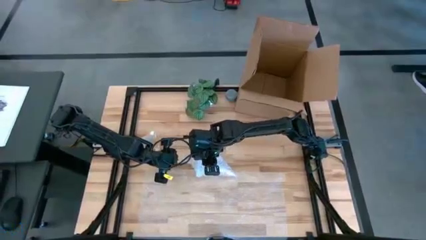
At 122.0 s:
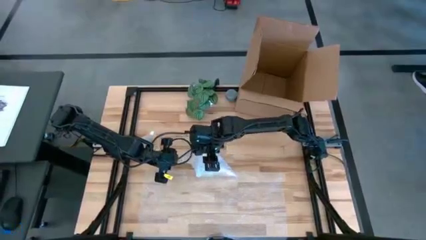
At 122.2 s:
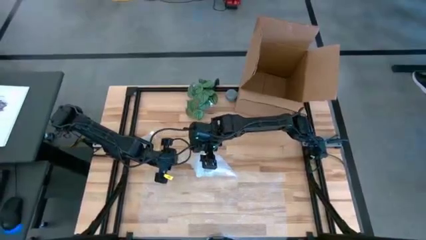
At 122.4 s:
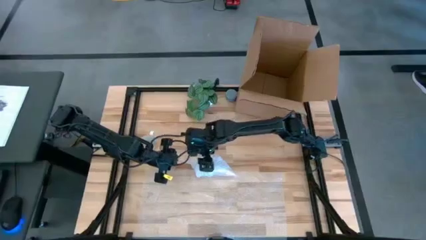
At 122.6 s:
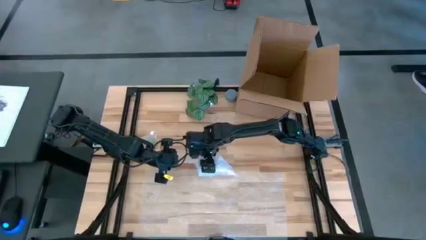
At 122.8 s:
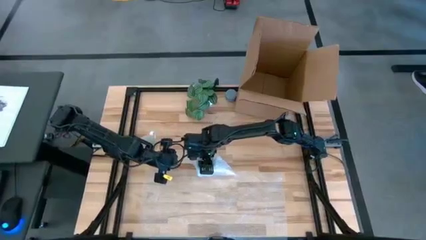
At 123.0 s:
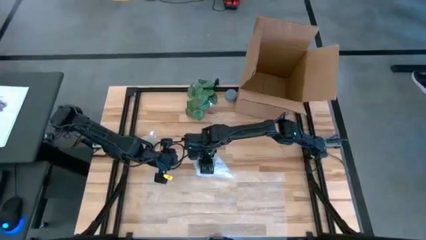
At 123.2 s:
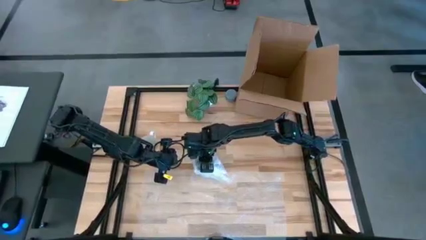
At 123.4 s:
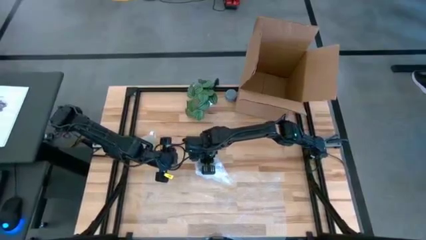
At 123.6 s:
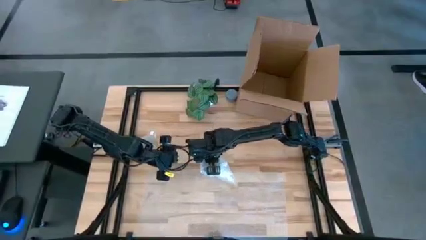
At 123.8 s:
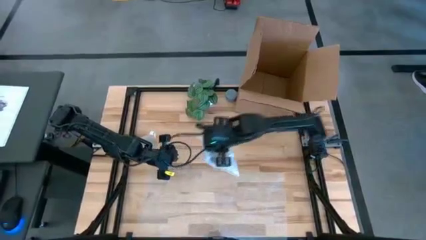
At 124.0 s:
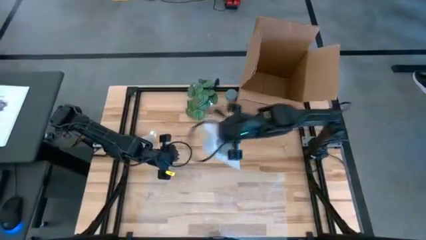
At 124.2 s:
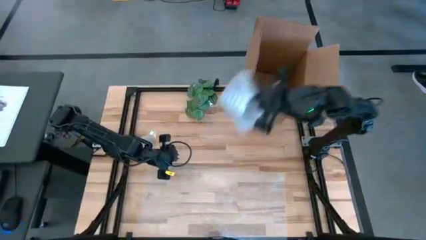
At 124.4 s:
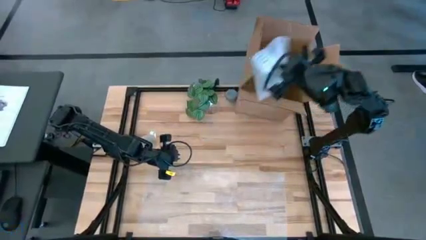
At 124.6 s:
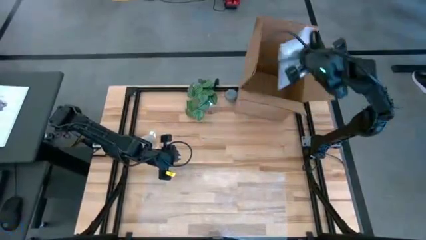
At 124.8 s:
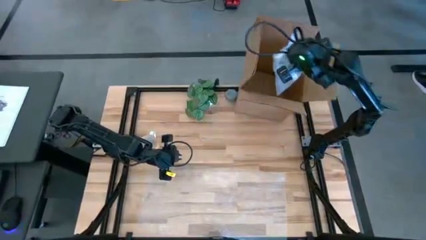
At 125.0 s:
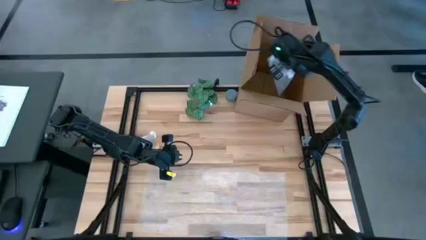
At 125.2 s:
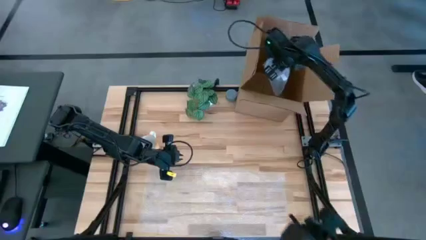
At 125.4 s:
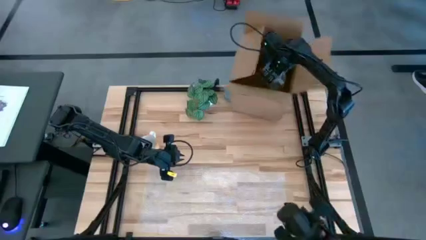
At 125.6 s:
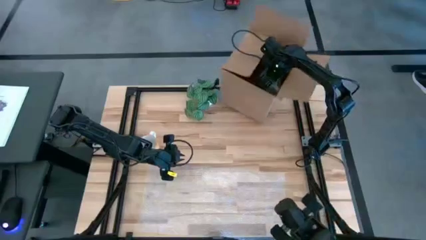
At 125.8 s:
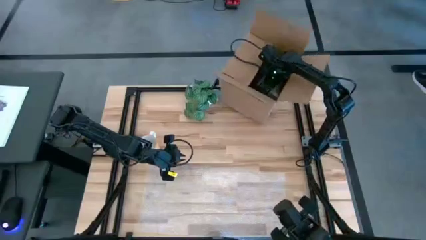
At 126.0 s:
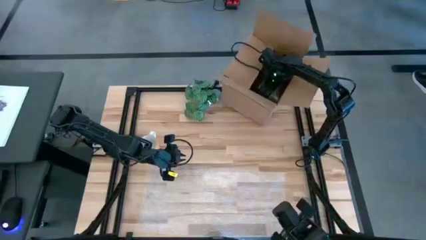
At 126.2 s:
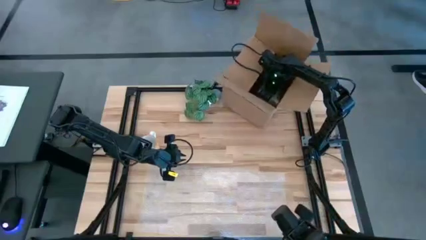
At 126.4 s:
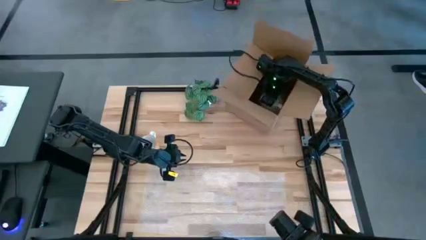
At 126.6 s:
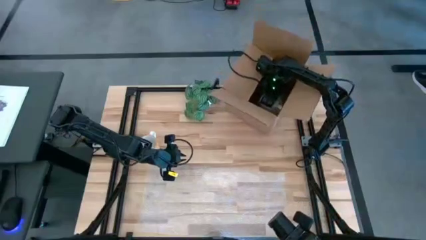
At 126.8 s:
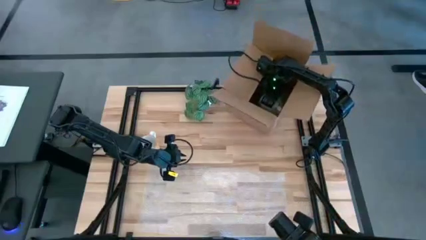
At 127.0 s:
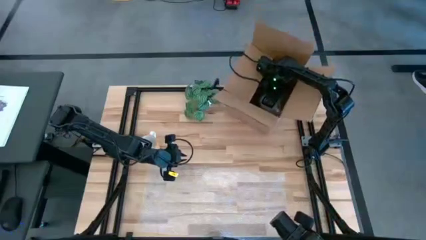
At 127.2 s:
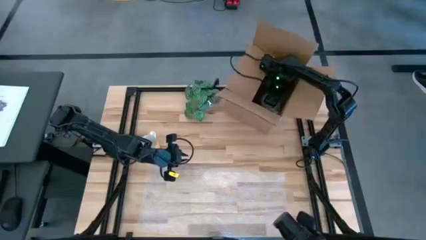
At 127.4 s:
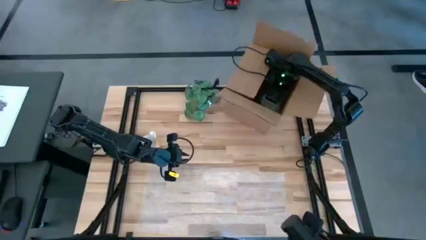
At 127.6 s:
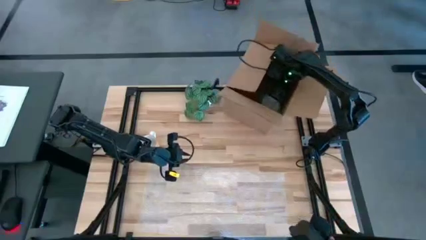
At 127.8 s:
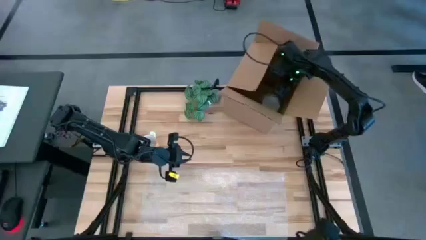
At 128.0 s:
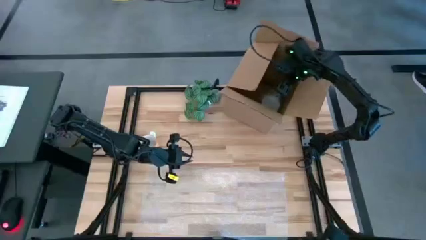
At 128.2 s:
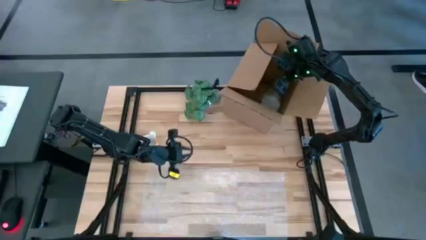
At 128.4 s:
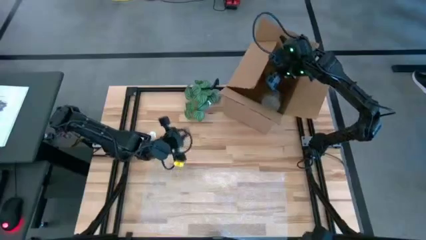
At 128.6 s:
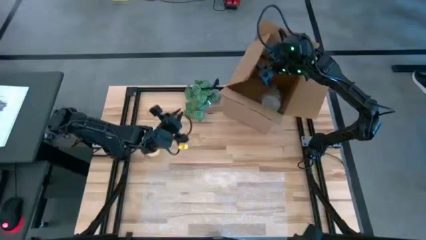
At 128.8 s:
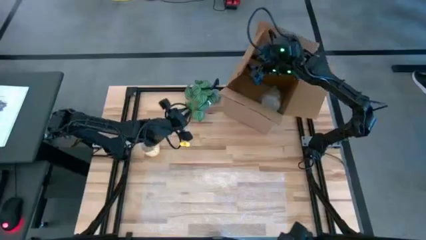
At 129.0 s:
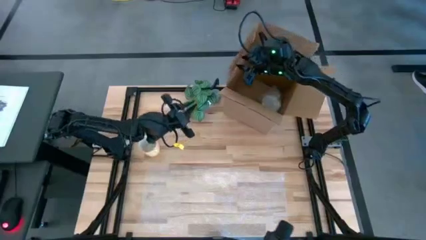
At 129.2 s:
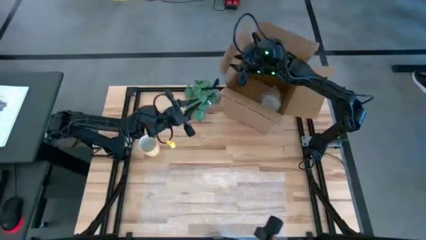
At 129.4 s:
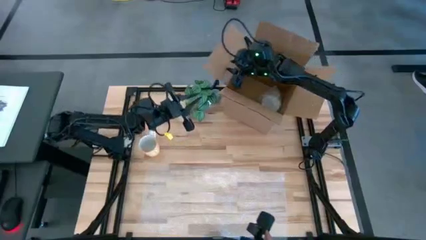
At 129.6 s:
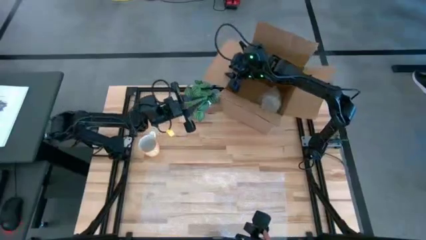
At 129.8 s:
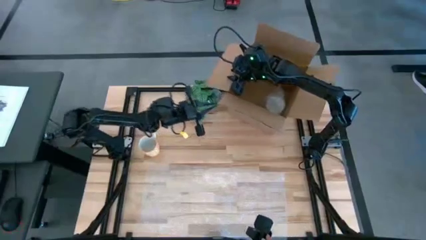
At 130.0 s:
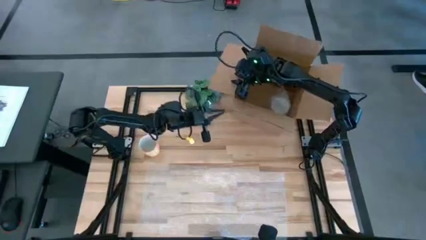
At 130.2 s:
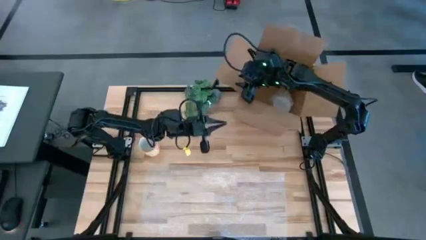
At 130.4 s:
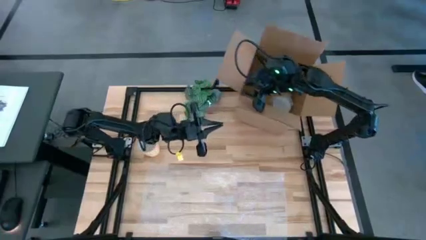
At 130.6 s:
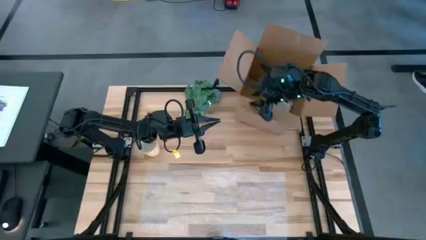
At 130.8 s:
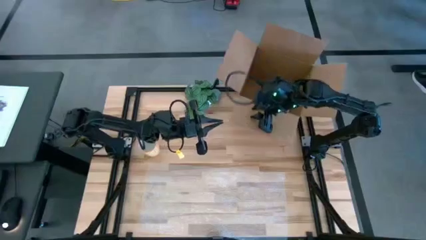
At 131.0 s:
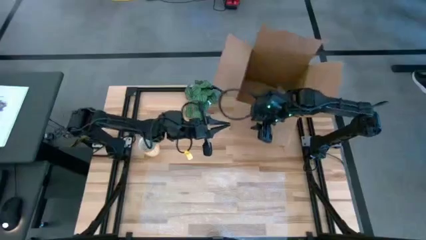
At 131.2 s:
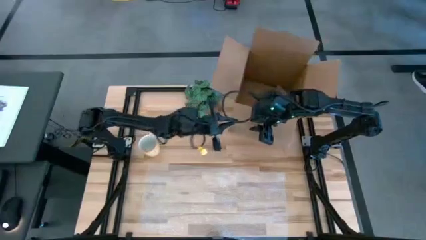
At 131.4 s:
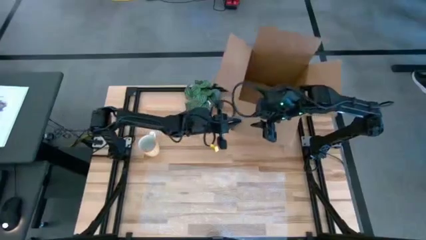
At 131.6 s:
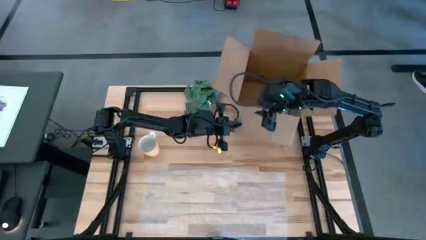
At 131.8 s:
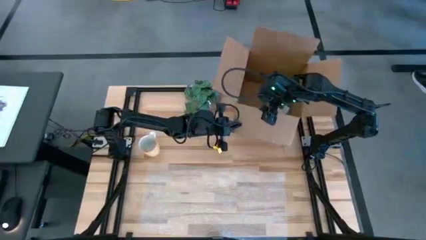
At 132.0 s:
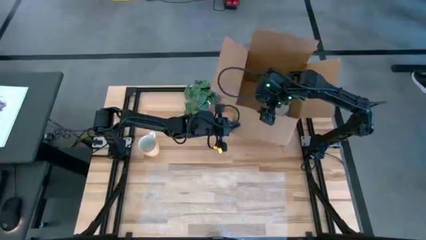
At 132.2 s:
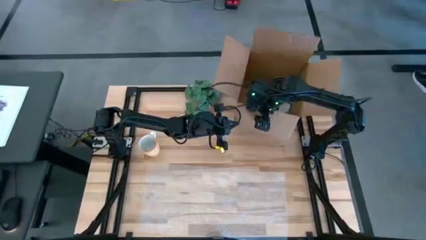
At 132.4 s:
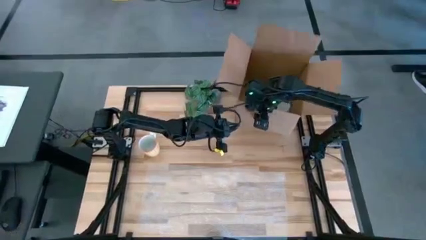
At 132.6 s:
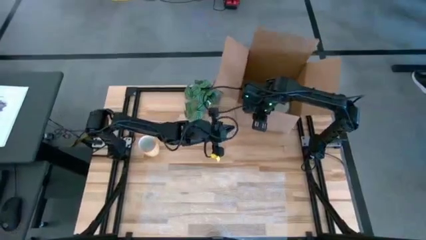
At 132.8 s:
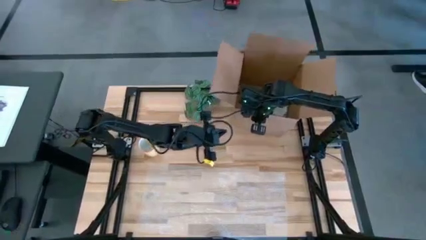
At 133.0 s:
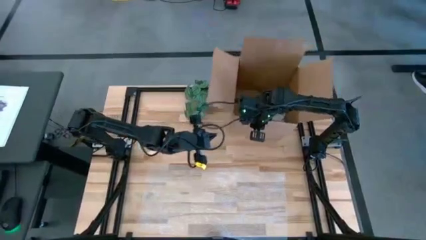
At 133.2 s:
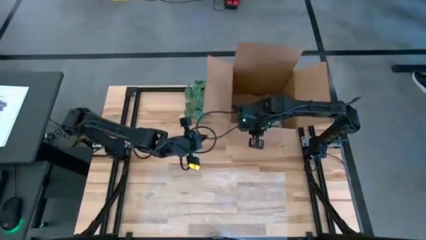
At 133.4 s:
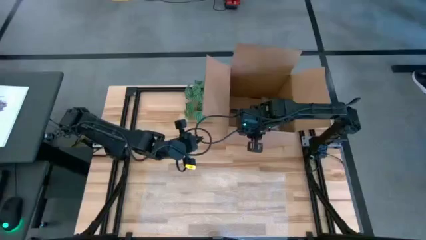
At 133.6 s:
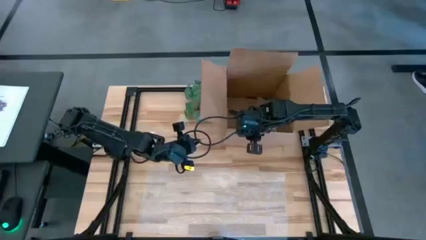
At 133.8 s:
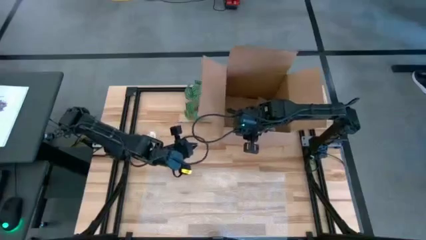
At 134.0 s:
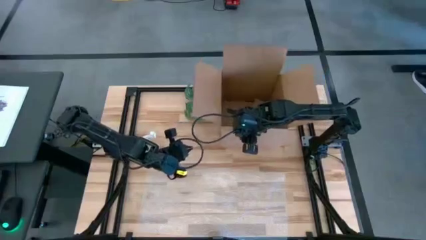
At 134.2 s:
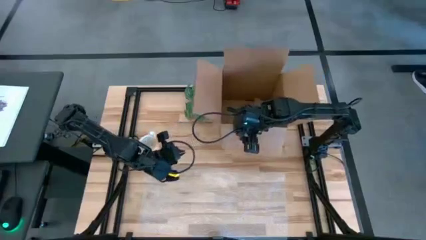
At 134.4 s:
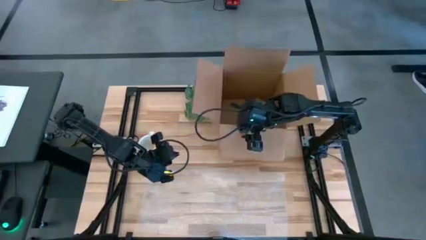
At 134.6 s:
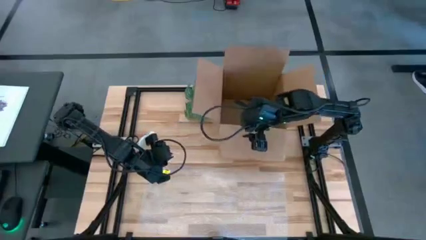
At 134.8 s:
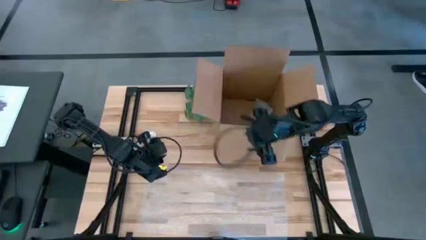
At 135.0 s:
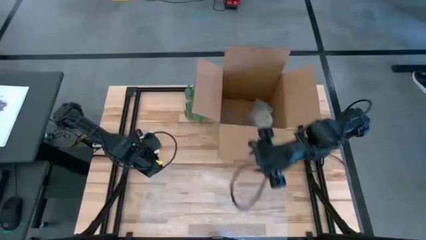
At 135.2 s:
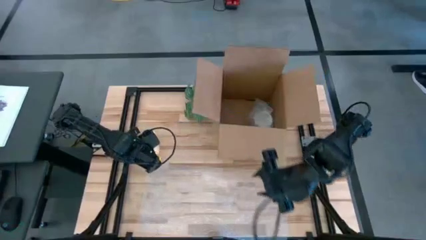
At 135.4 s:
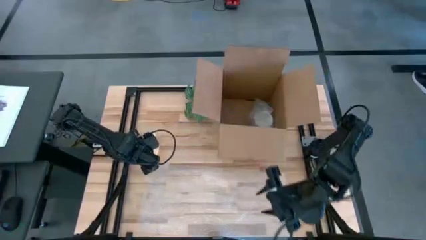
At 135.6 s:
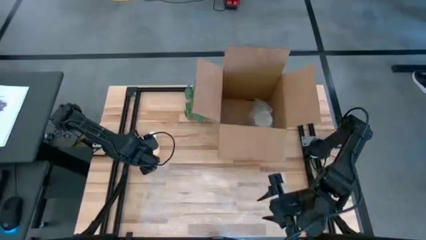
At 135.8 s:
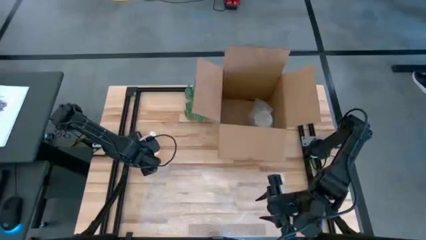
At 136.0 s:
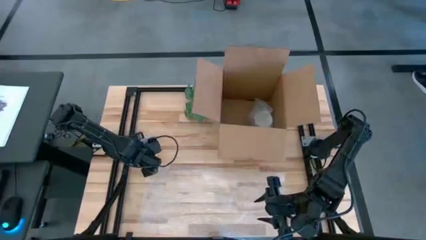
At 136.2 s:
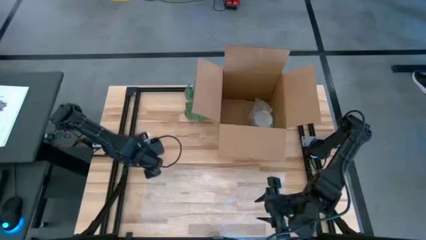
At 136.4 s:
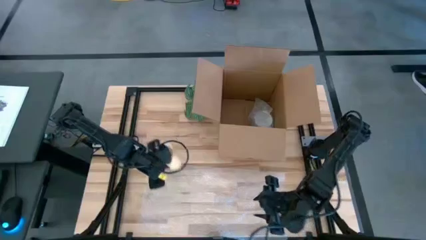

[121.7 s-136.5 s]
Task: wrap mug
Put the blue wrapped mug into the box

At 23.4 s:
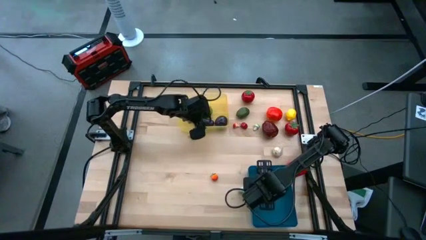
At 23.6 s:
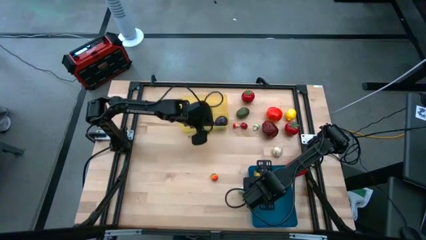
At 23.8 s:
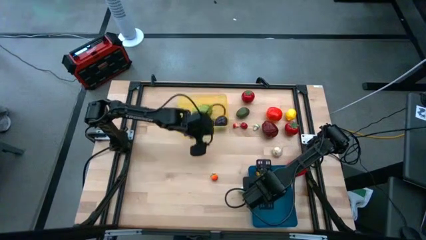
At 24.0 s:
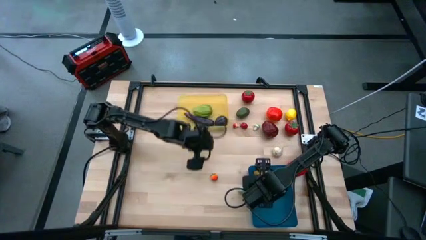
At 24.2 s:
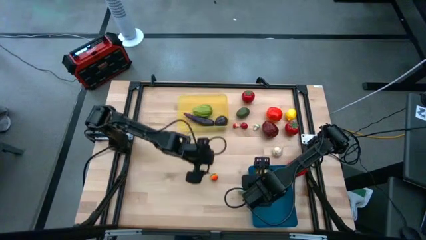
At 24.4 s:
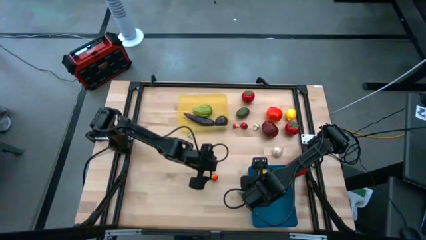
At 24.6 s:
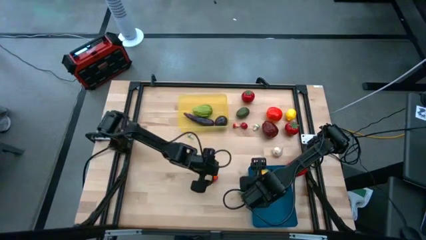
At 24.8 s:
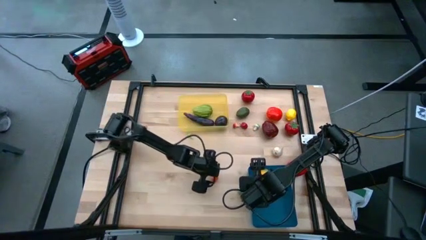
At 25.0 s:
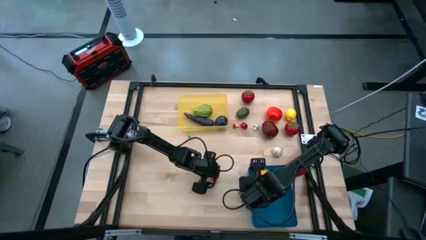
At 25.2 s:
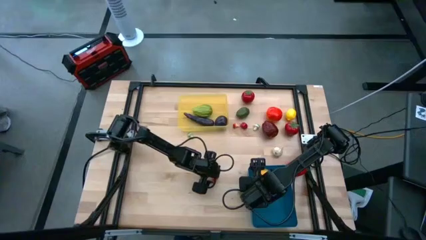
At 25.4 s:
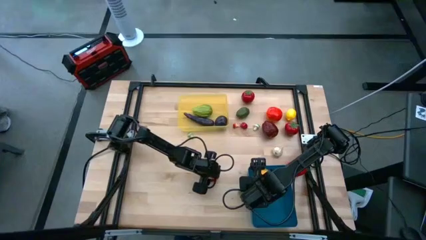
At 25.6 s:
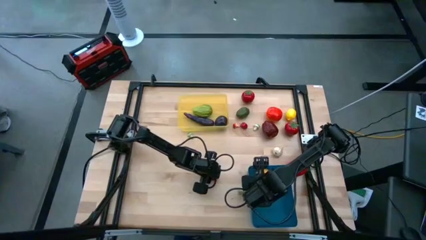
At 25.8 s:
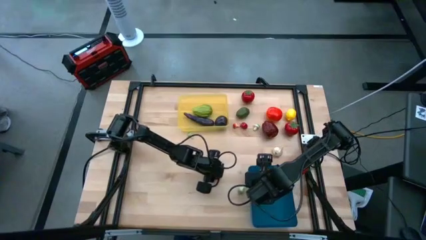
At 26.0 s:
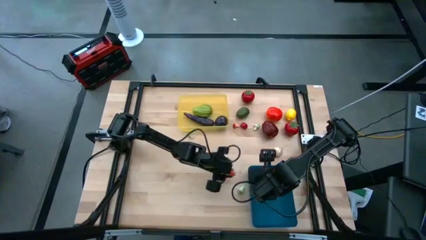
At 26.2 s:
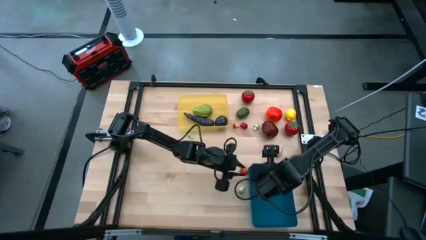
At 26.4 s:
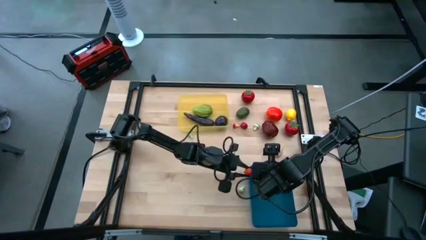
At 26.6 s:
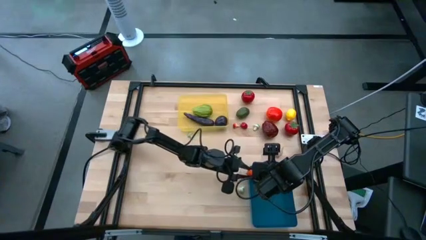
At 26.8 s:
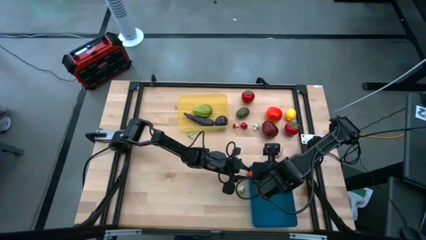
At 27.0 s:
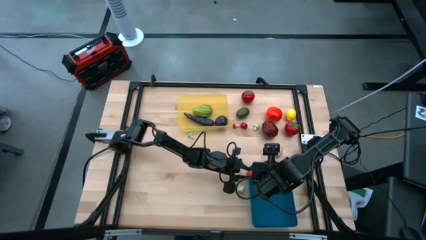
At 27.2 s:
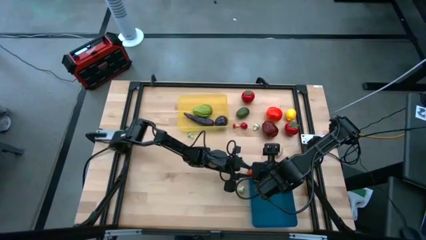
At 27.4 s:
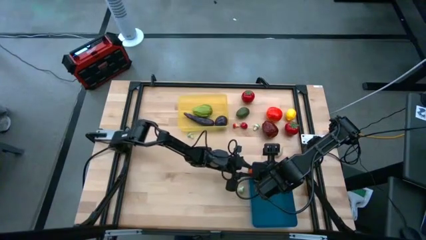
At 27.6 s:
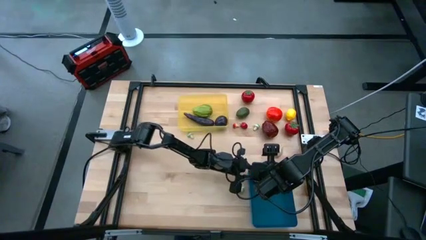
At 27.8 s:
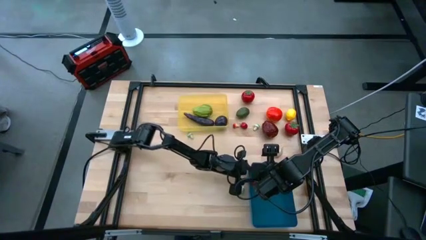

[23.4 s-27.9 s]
Task: Sort produce into baskets
Put the tomato into the blue bin
